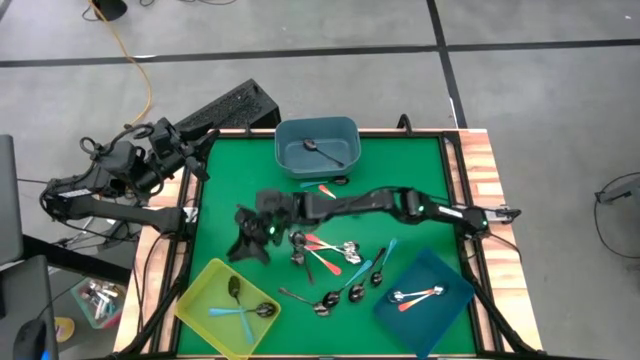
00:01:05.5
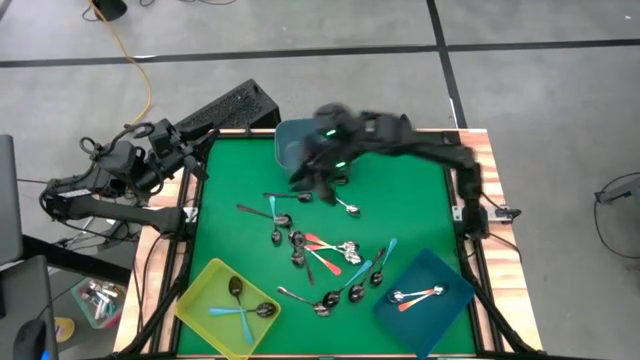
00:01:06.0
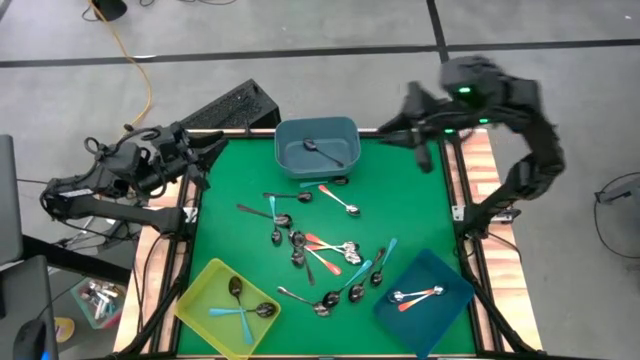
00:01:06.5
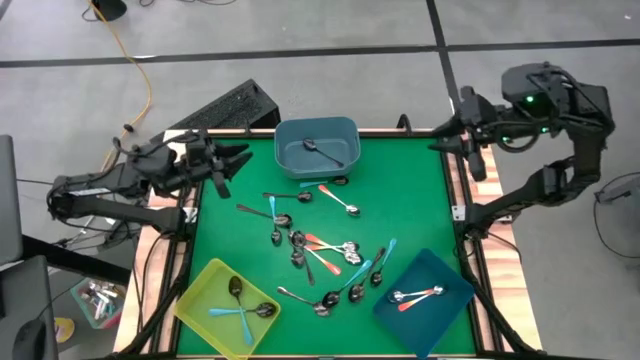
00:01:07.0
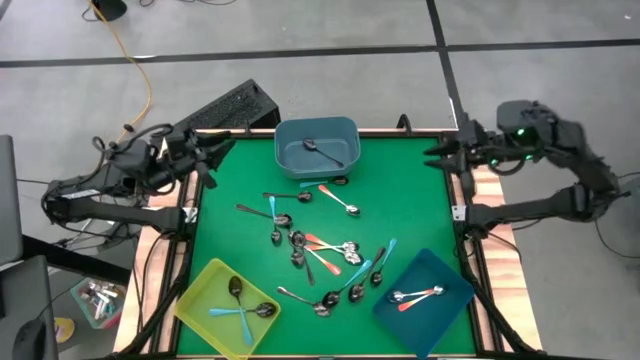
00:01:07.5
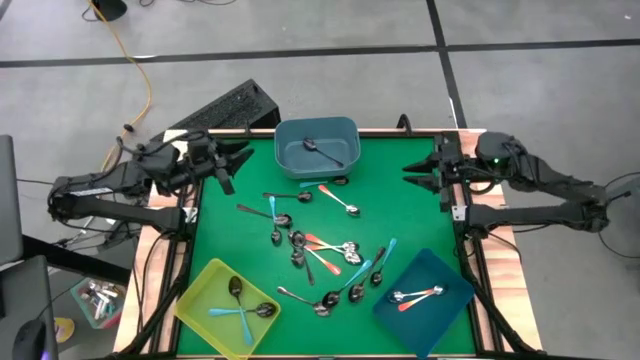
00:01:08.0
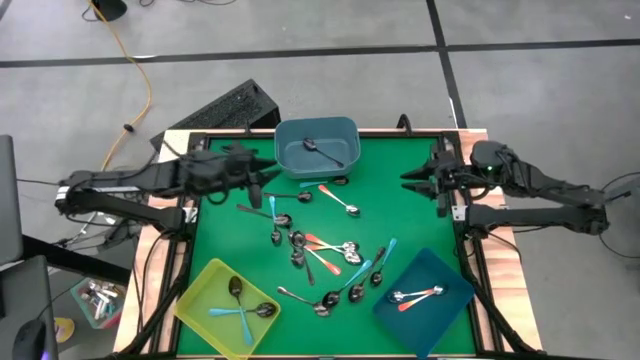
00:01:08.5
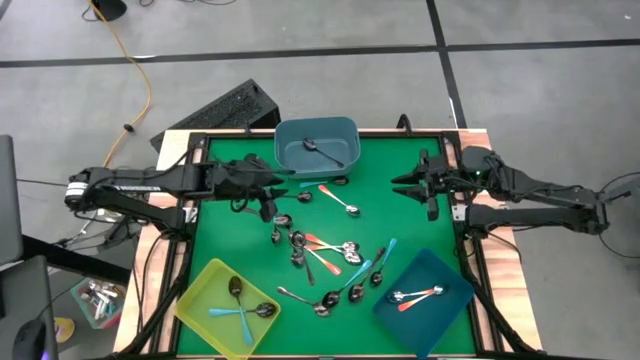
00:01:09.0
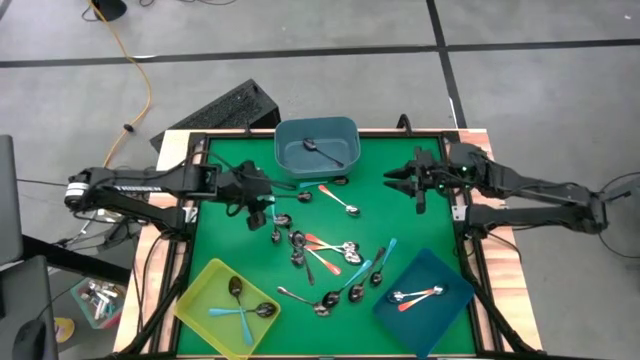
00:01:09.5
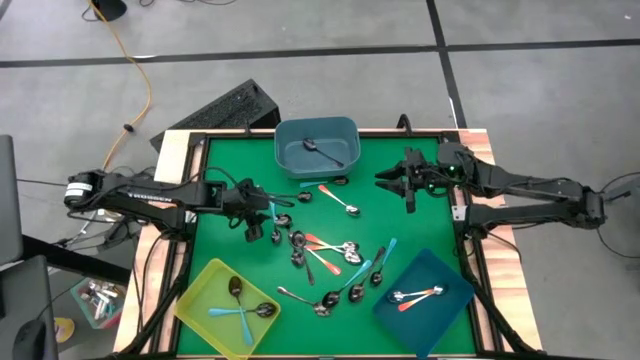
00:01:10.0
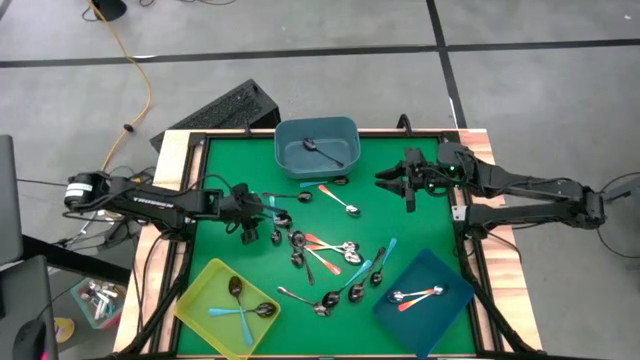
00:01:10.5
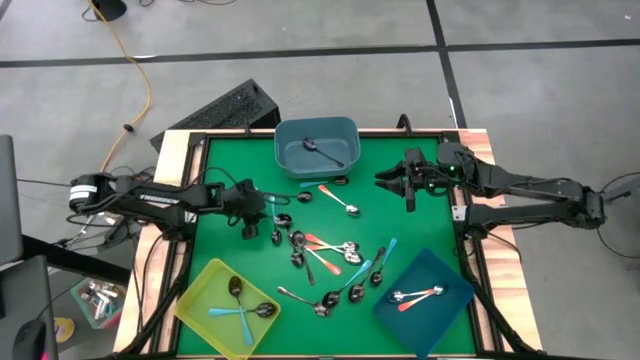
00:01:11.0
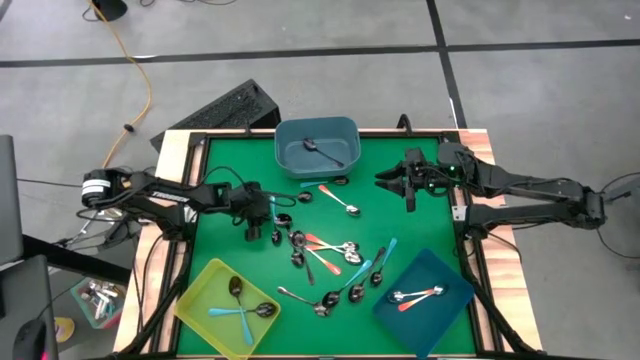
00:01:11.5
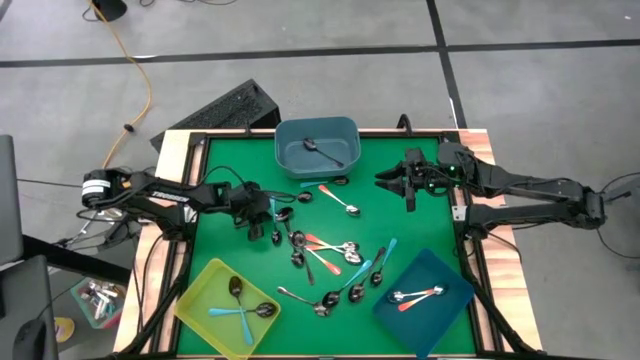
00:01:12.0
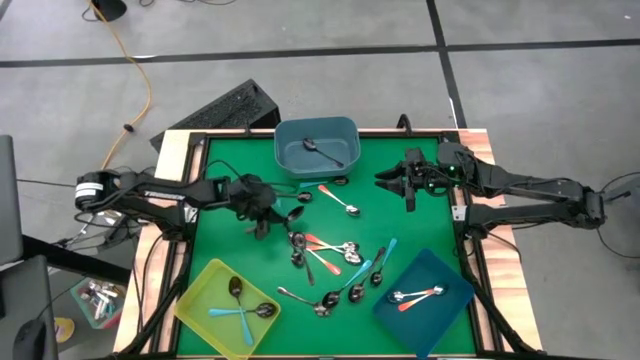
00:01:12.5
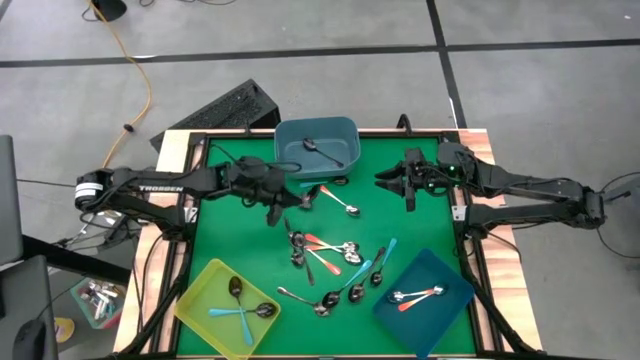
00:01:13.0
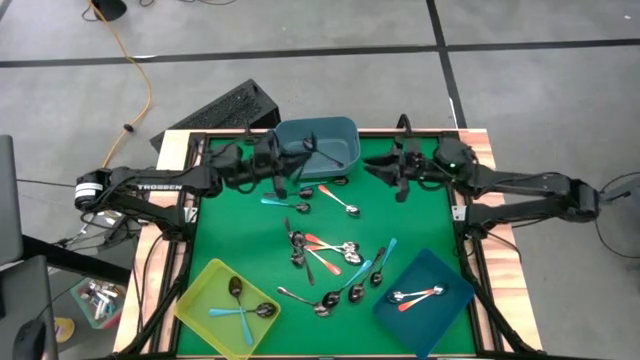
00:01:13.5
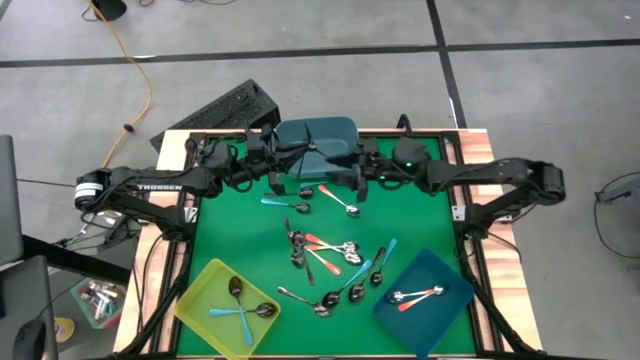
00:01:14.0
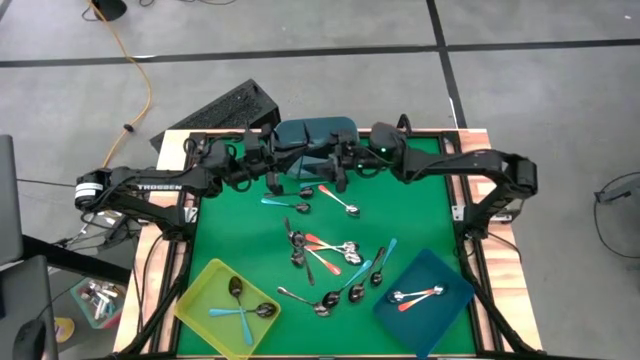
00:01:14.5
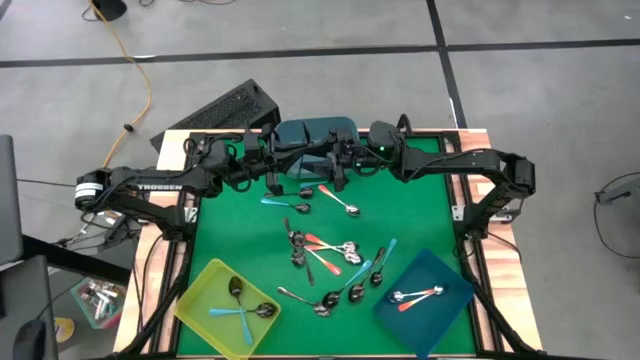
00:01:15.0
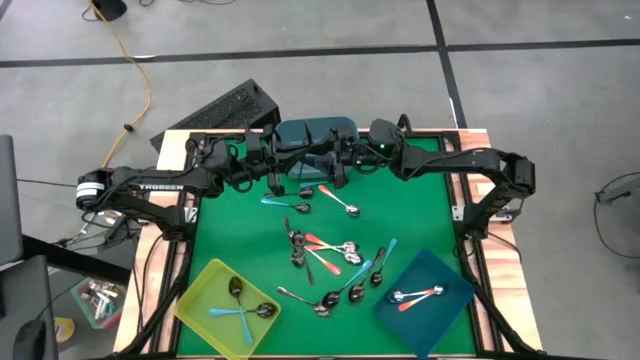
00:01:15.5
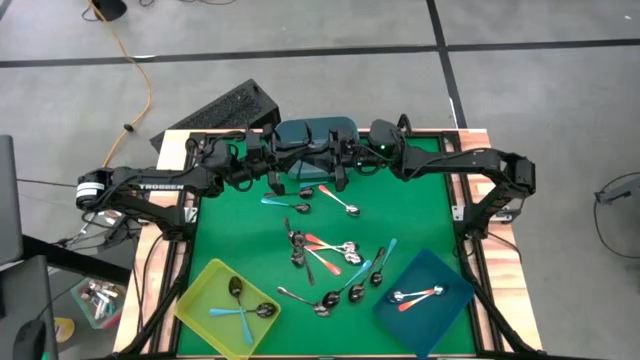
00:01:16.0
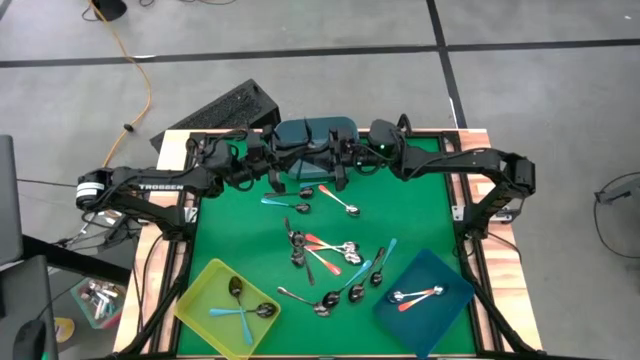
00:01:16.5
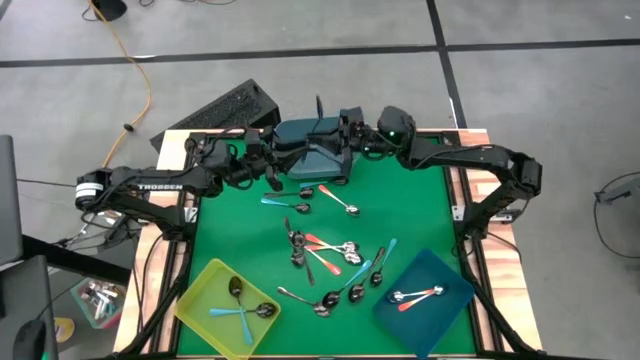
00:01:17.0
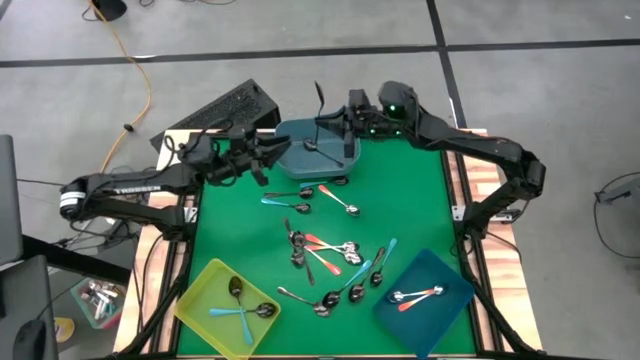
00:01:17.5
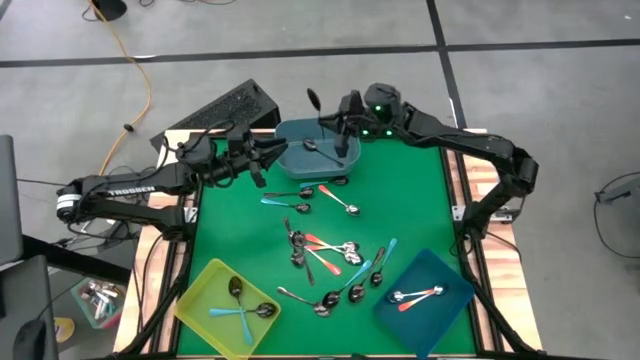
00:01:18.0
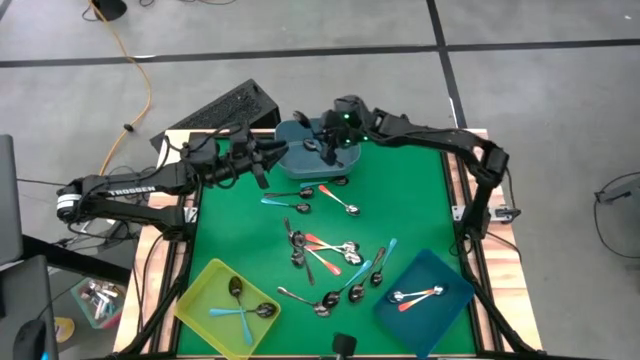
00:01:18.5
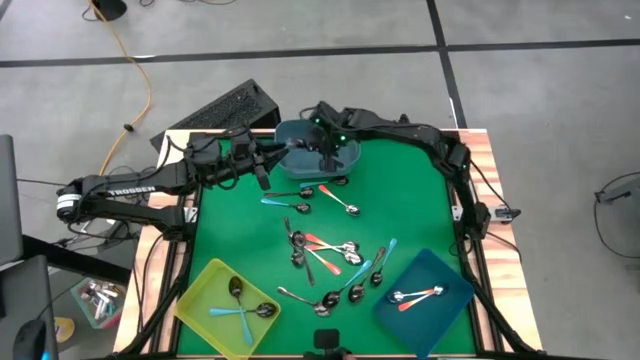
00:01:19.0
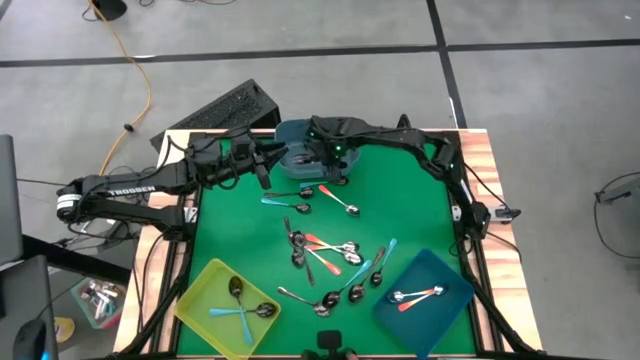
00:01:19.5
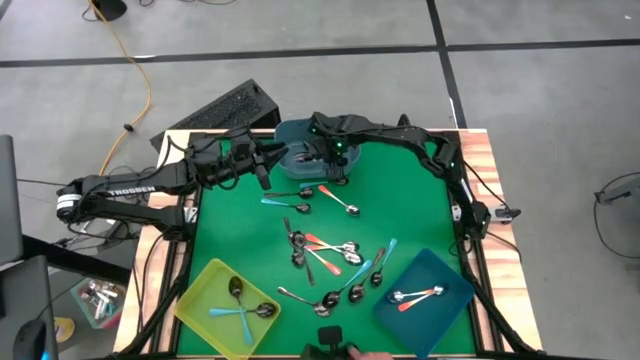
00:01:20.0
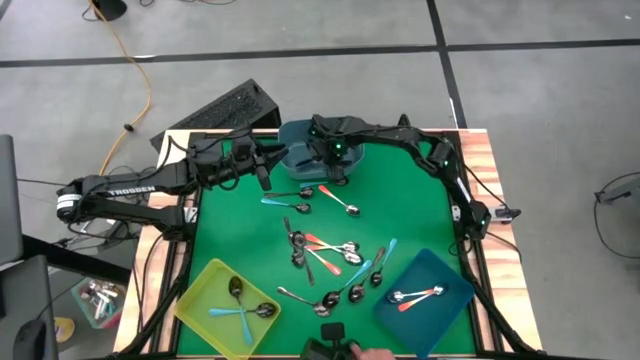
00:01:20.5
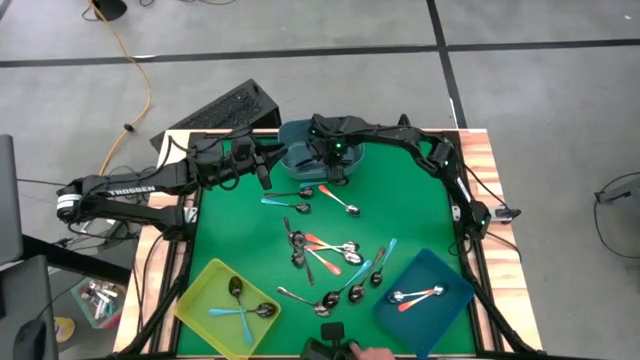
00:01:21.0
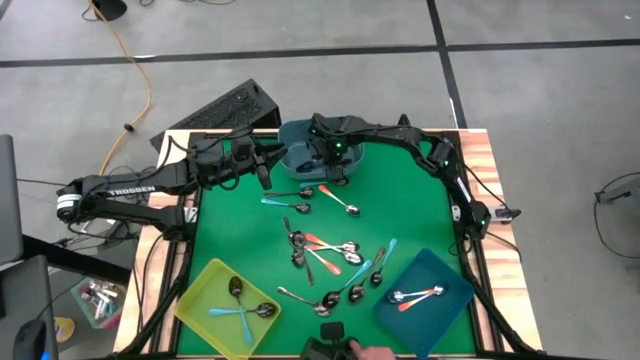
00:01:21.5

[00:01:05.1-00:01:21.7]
Task: Sort silverware by color (type)
Put the black spoon into the light blue bin

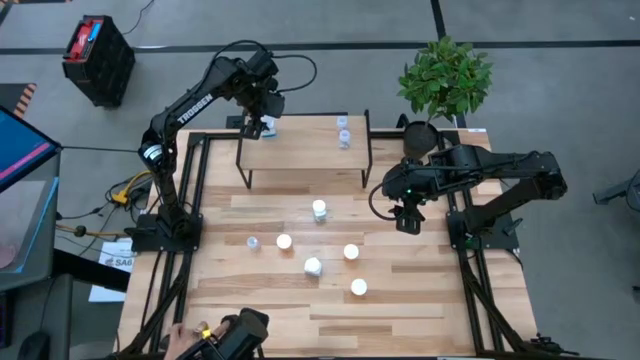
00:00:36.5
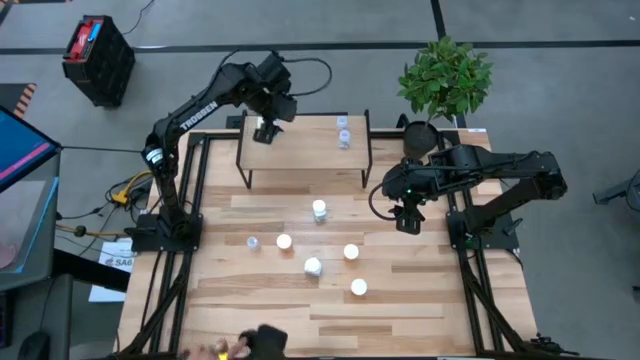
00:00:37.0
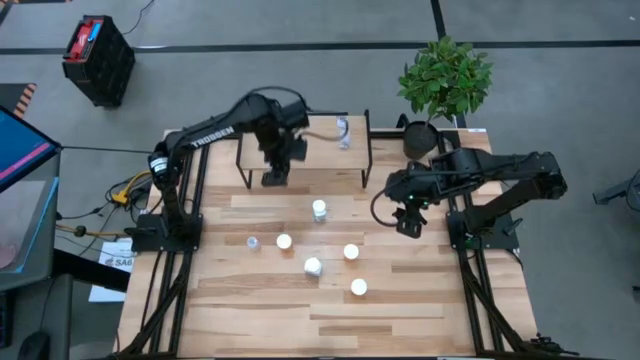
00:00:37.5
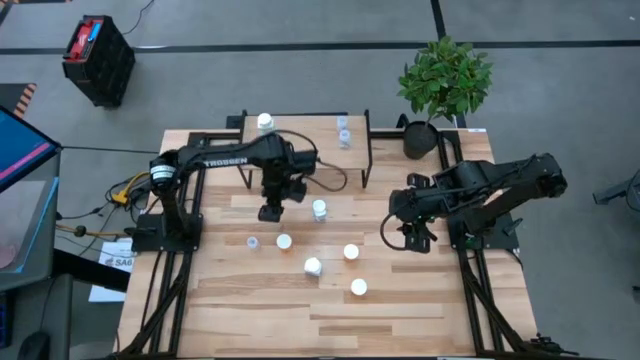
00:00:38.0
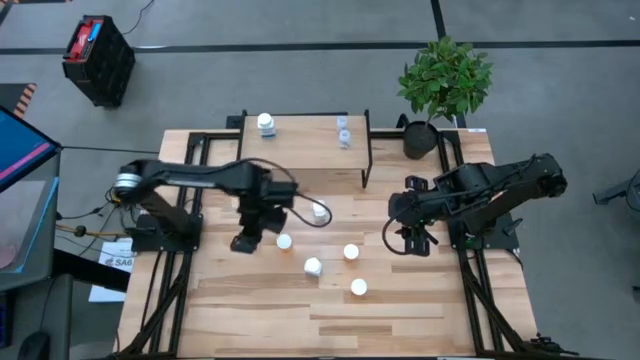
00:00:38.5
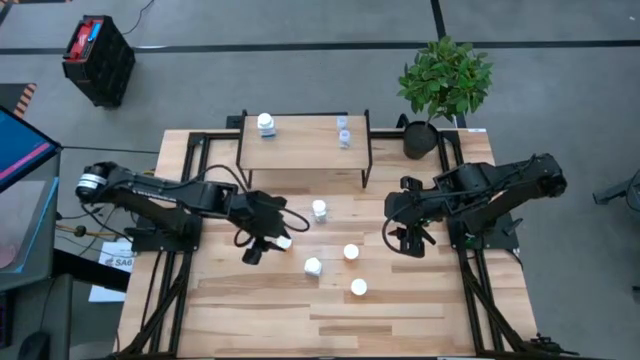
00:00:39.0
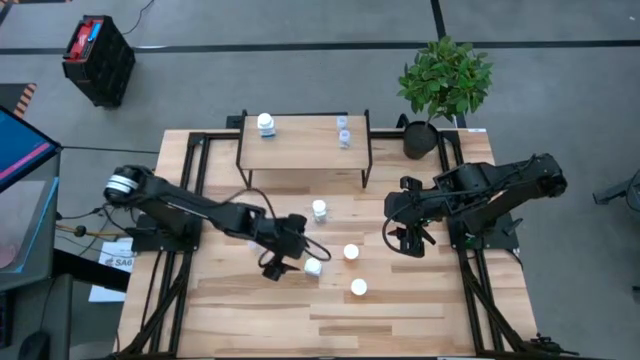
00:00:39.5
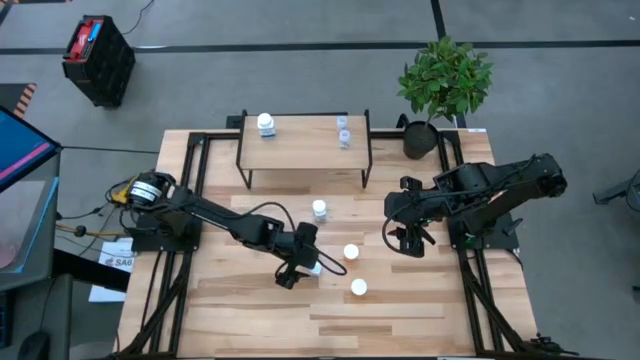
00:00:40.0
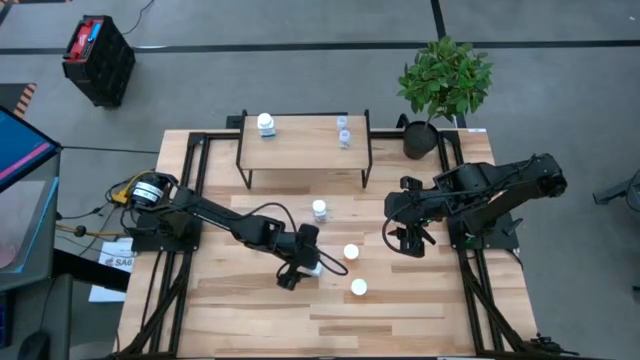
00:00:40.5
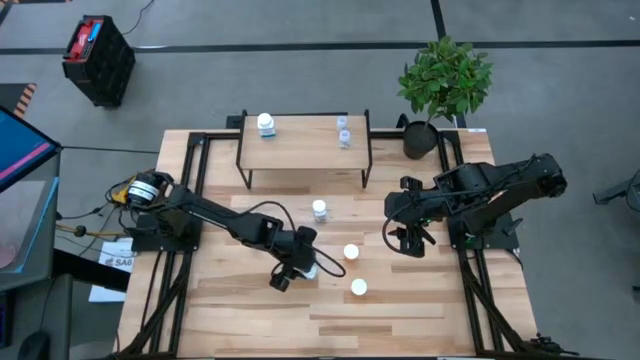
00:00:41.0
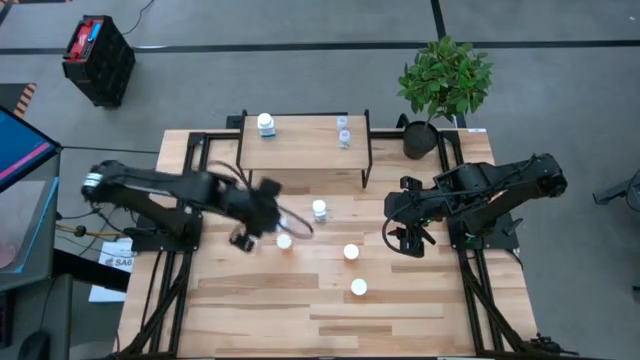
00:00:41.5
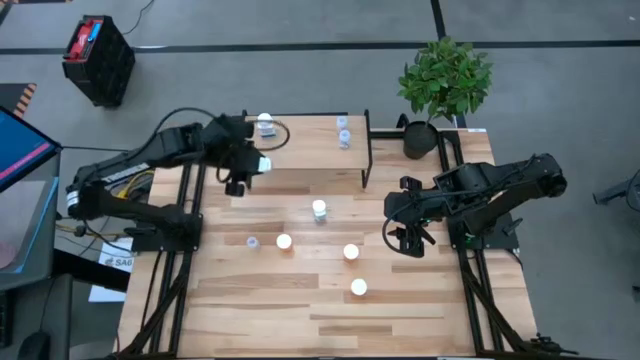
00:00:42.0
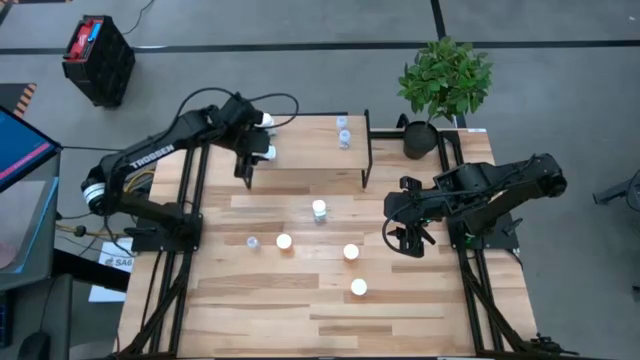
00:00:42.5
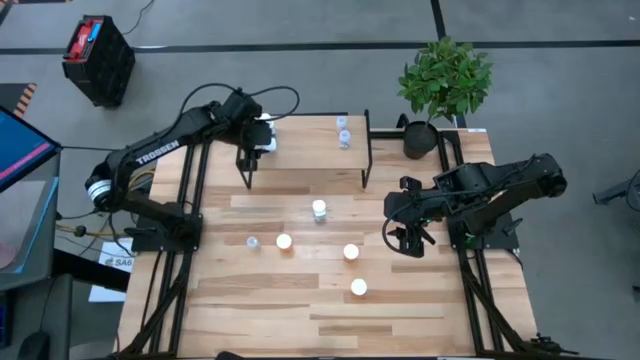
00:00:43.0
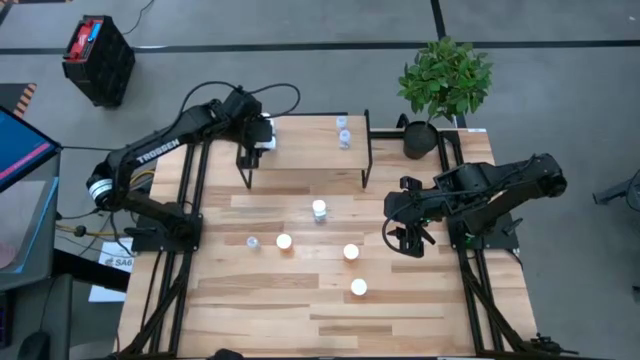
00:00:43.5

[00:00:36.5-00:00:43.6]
Task: Pick and place medicine bottles onto shelf by color
Put the bottom white pill bottle on the shelf aligned with the other white pill bottle
